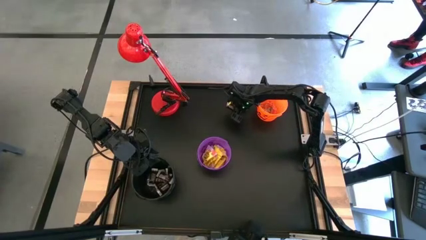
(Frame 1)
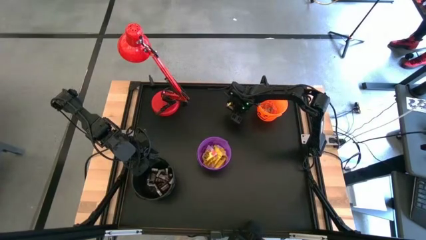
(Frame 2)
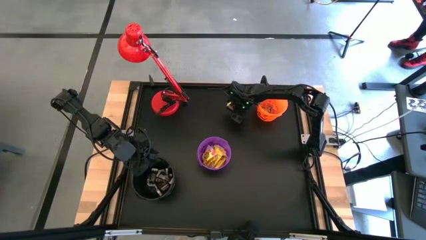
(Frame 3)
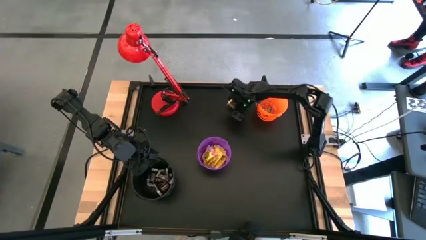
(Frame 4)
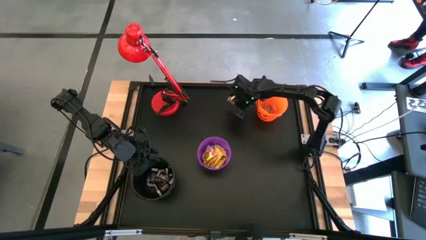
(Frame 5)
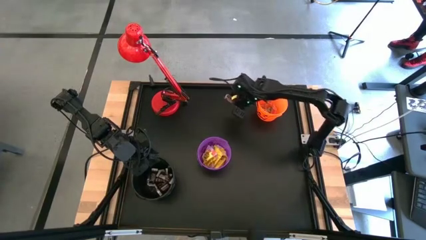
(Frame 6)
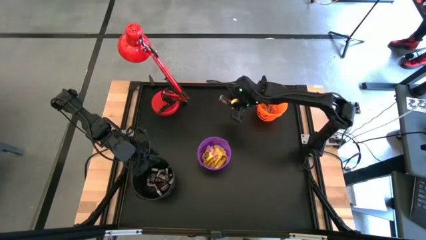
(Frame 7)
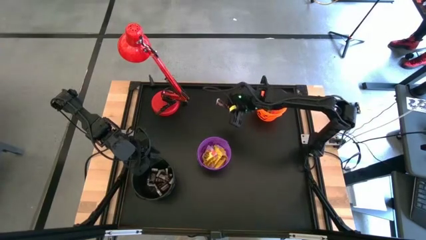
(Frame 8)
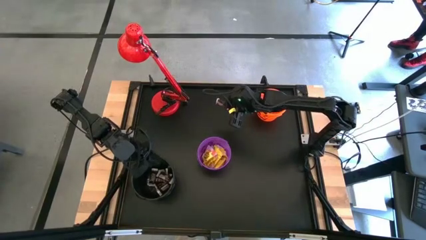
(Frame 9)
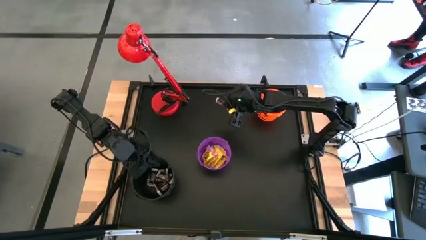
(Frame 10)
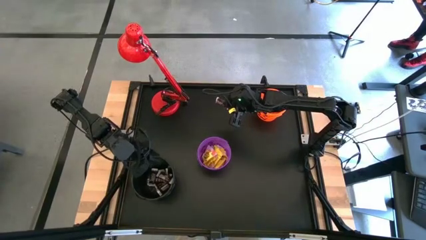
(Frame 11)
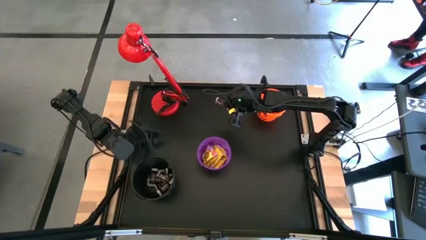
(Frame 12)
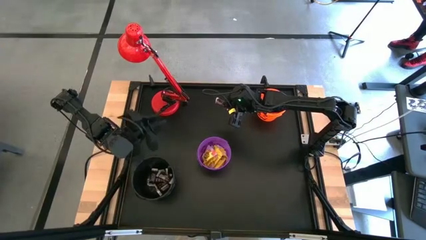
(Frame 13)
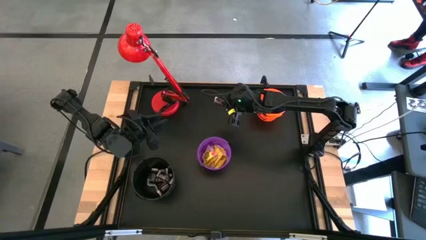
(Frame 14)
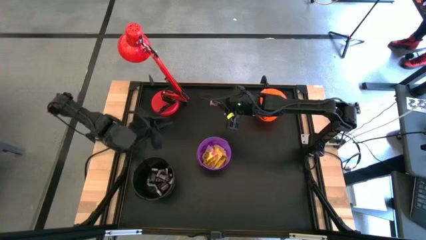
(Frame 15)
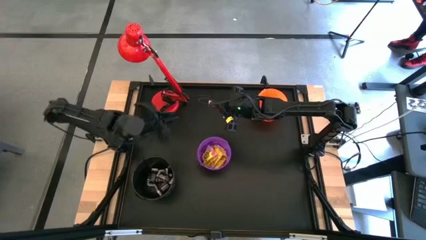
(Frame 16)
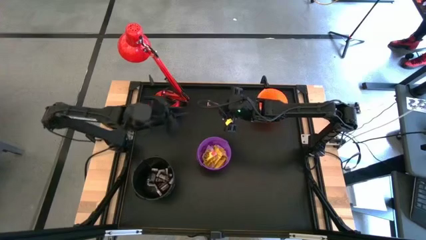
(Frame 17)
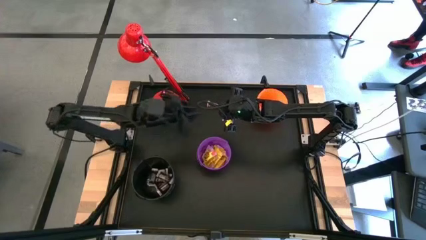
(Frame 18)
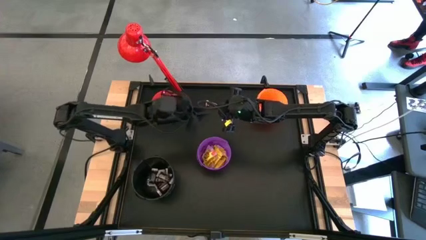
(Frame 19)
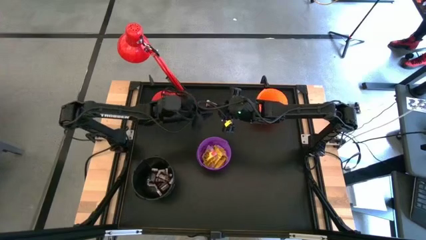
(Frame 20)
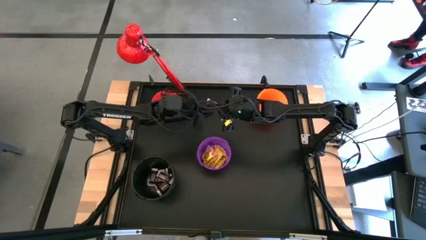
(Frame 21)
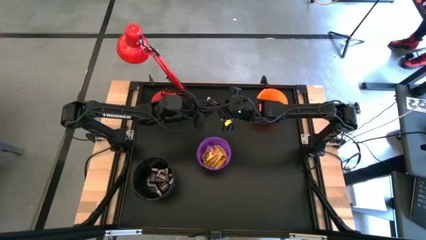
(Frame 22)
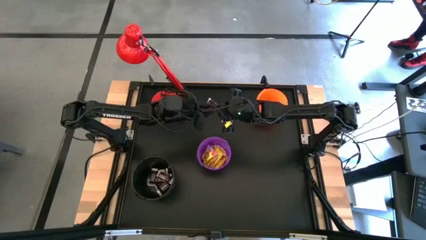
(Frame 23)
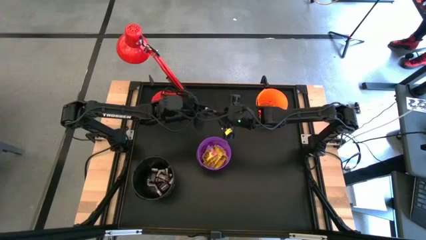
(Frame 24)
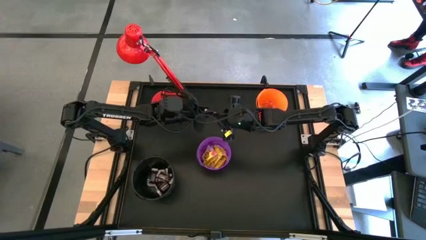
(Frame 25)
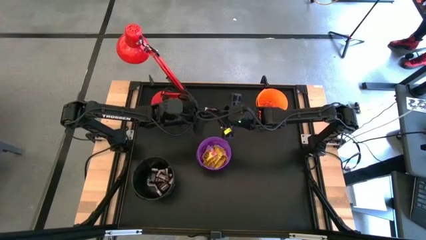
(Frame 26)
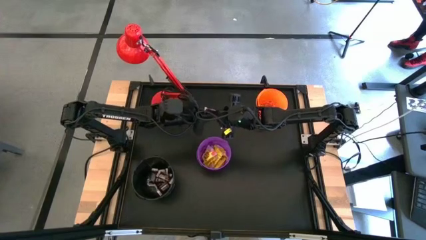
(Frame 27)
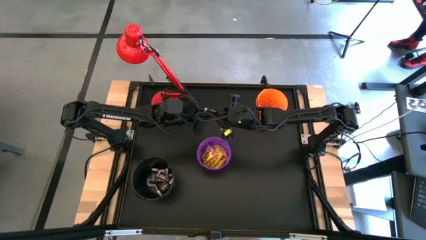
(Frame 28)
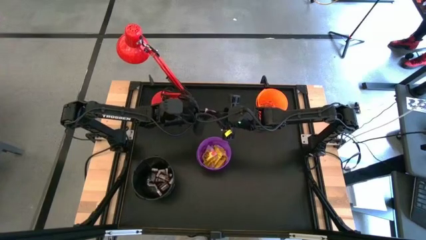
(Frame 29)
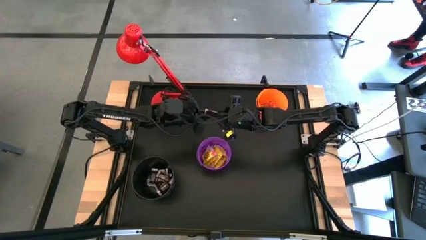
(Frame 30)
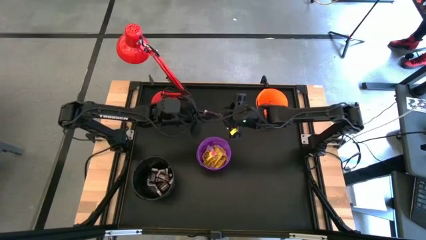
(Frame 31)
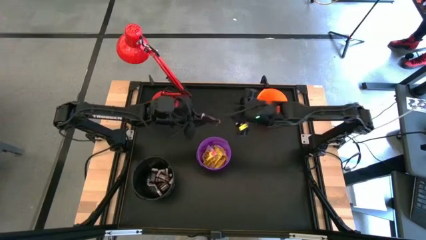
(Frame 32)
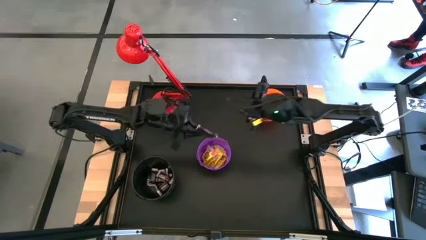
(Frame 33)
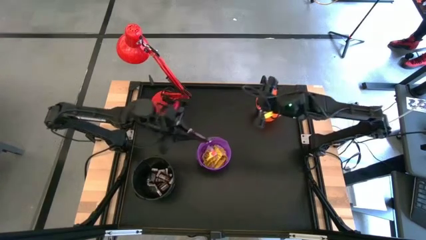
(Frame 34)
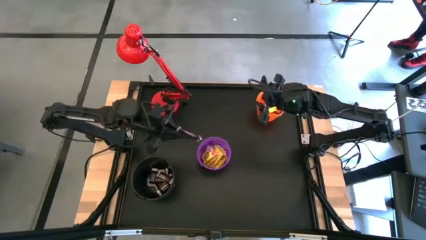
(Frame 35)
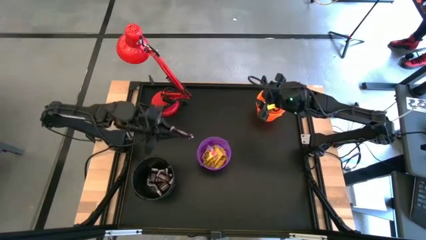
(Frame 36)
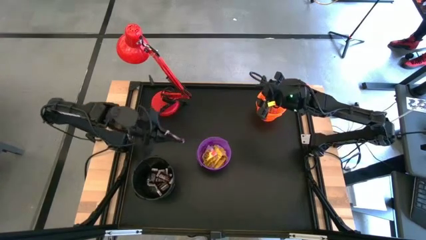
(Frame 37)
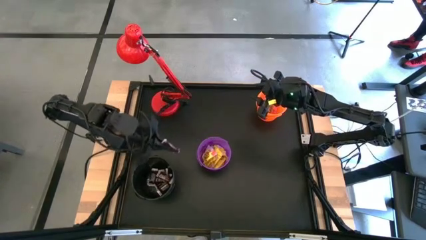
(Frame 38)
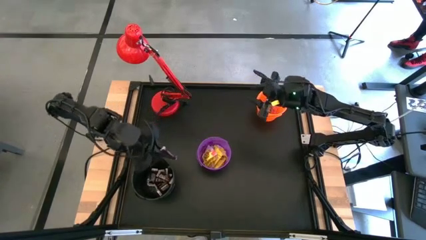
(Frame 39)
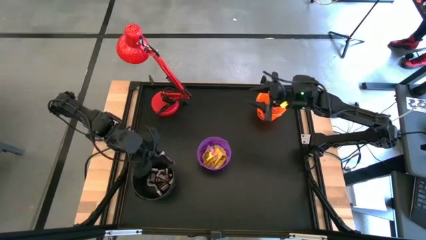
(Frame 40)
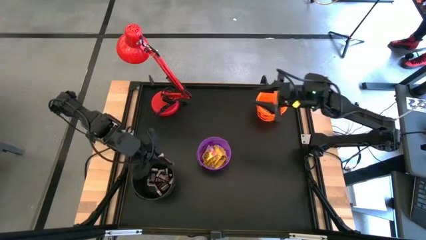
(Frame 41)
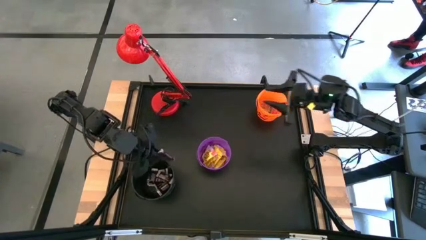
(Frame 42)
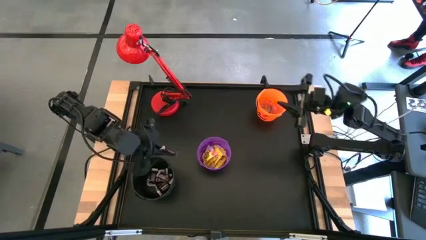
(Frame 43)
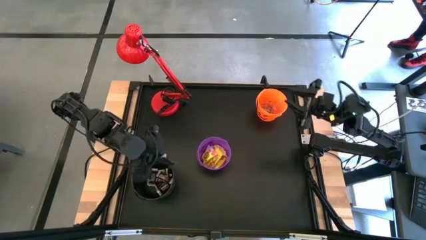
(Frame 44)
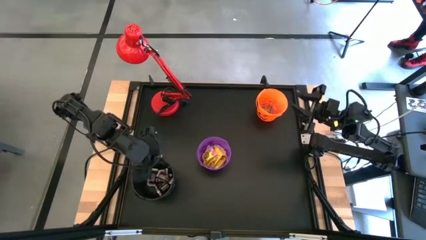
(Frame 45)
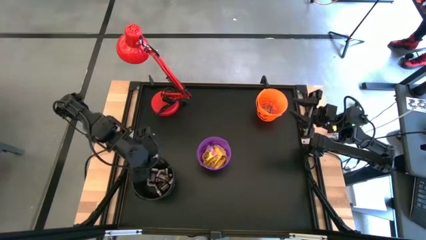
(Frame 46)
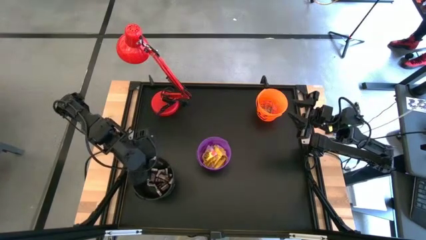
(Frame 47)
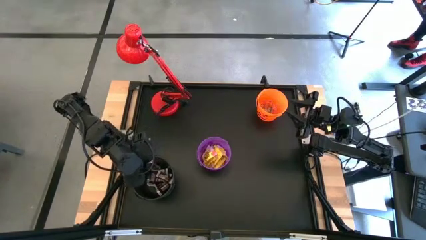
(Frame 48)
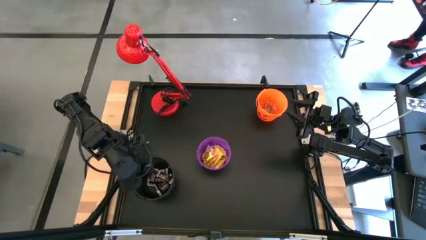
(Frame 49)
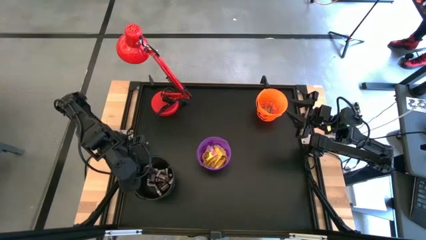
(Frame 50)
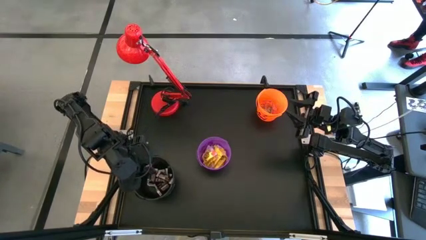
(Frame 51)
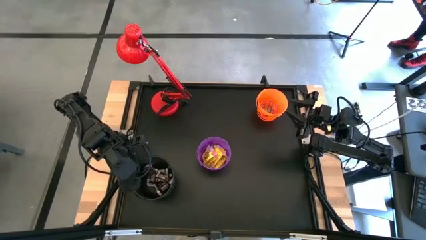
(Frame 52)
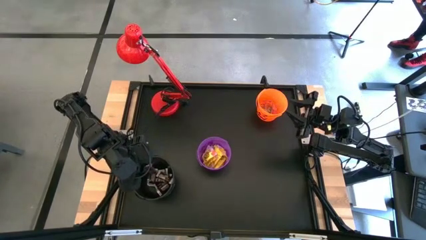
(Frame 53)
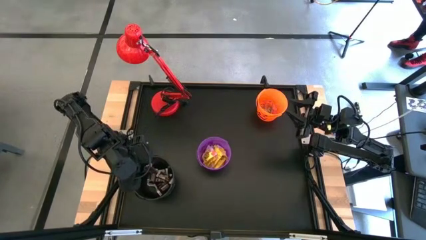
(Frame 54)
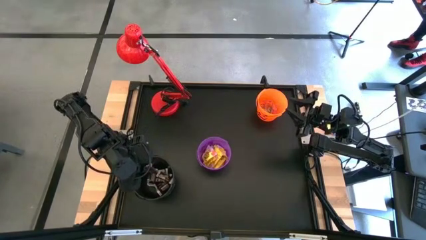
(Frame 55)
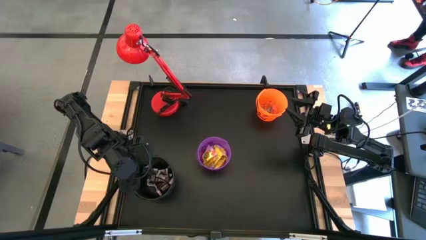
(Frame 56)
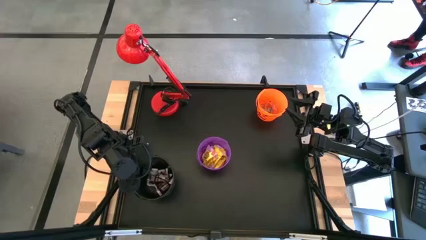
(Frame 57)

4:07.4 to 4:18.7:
Task: Sort candy
Put the brown chocolate bar into the black bucket
